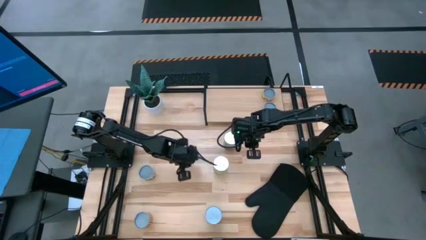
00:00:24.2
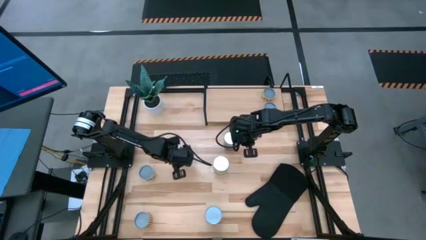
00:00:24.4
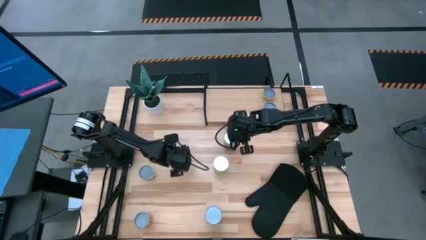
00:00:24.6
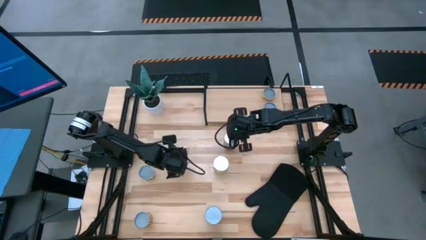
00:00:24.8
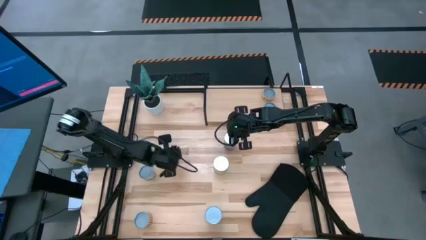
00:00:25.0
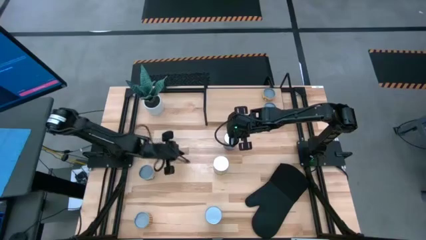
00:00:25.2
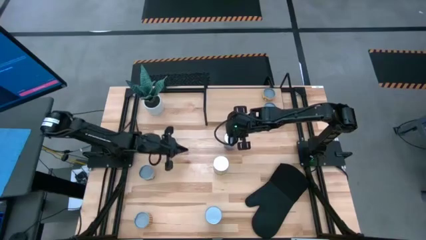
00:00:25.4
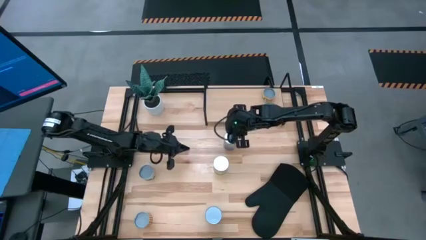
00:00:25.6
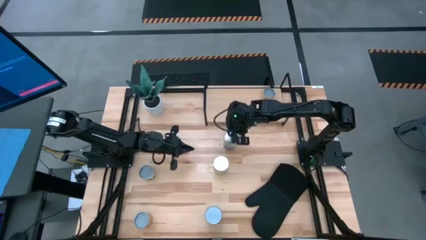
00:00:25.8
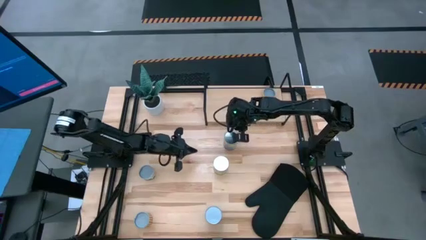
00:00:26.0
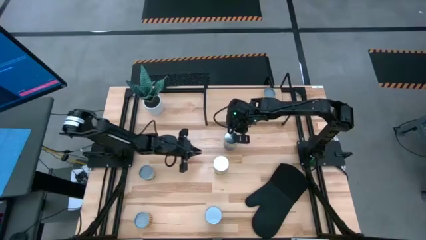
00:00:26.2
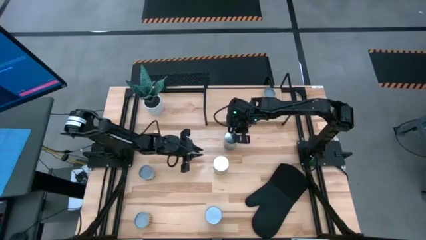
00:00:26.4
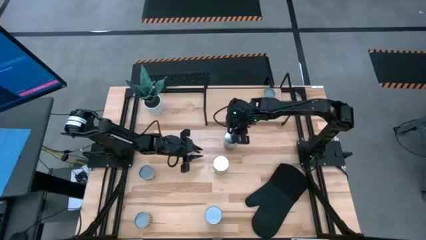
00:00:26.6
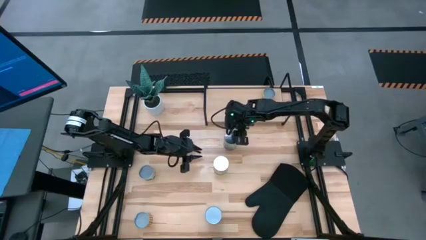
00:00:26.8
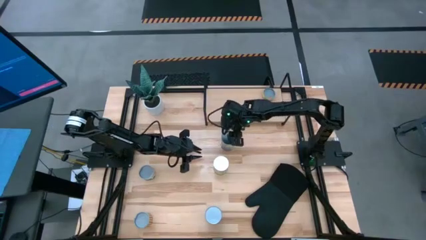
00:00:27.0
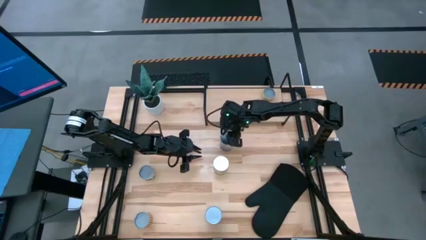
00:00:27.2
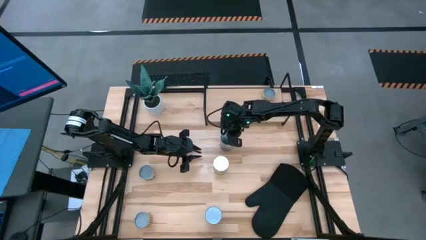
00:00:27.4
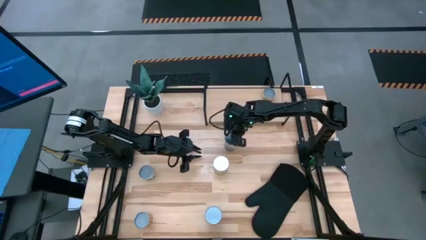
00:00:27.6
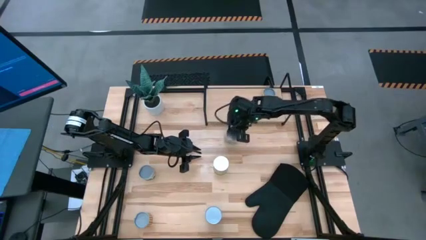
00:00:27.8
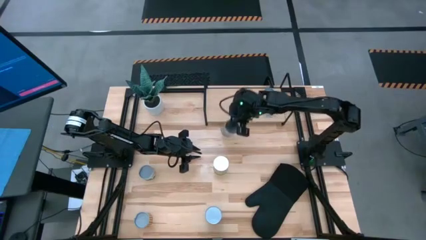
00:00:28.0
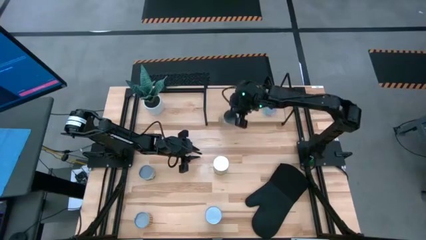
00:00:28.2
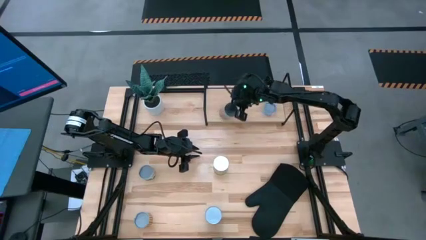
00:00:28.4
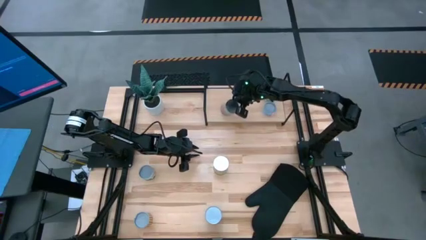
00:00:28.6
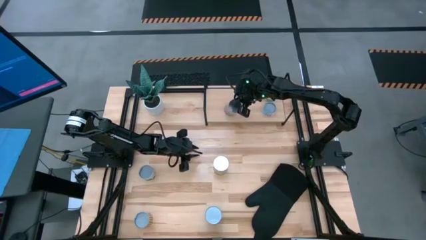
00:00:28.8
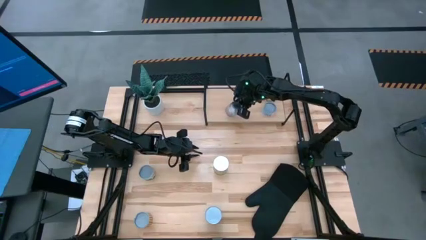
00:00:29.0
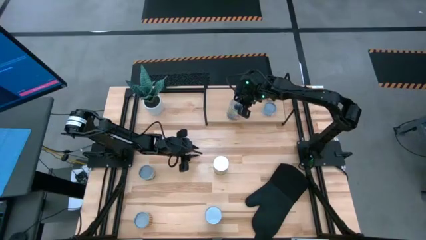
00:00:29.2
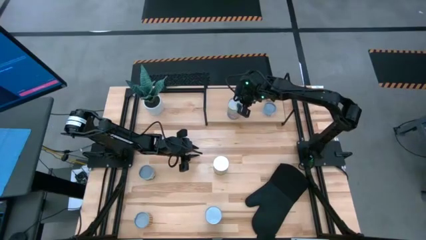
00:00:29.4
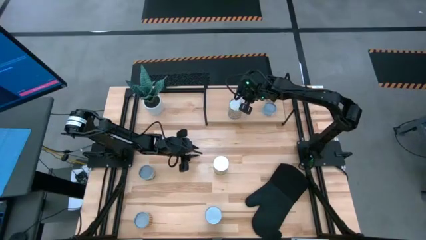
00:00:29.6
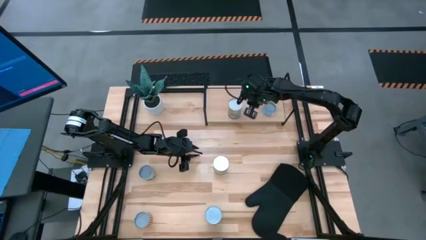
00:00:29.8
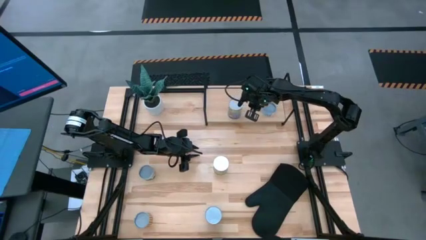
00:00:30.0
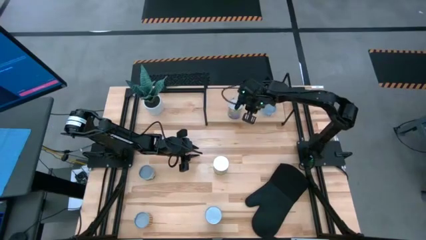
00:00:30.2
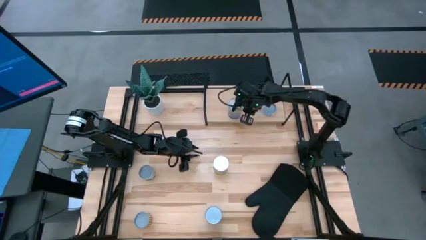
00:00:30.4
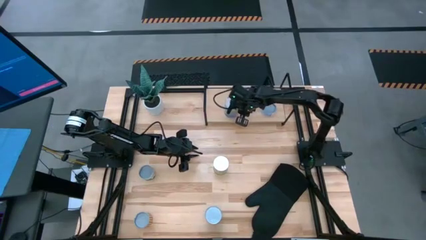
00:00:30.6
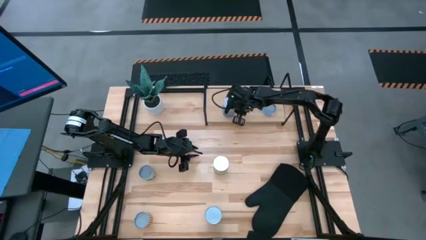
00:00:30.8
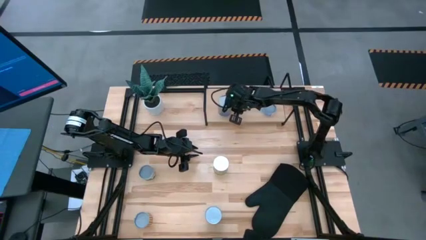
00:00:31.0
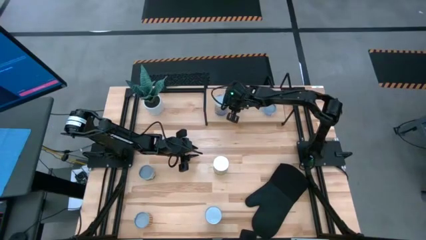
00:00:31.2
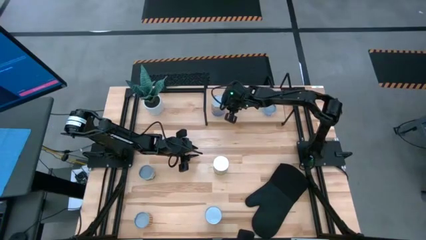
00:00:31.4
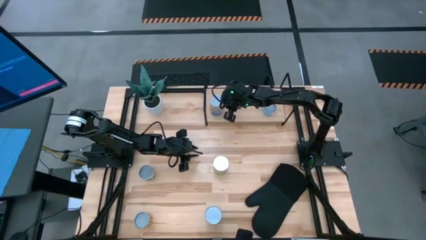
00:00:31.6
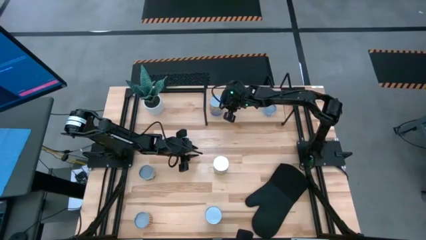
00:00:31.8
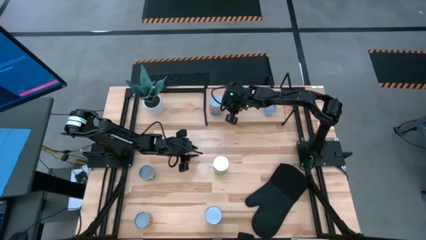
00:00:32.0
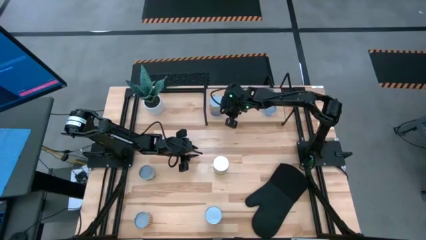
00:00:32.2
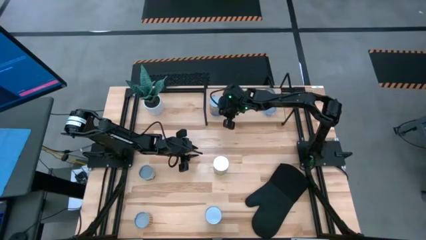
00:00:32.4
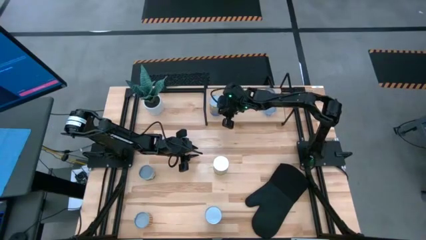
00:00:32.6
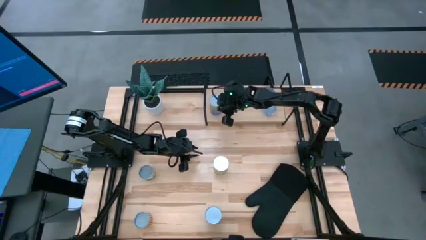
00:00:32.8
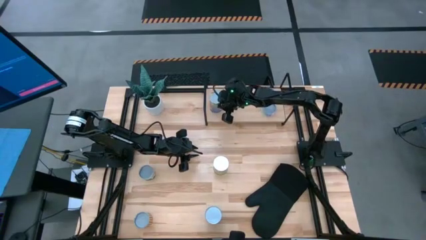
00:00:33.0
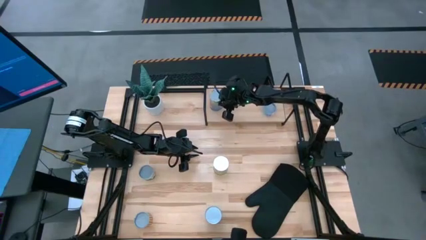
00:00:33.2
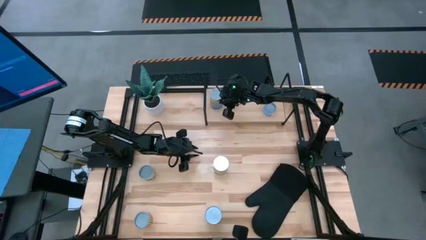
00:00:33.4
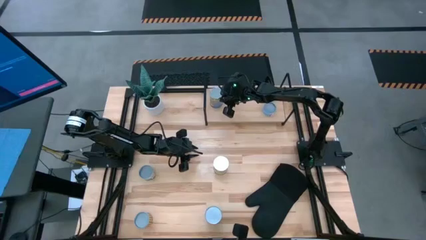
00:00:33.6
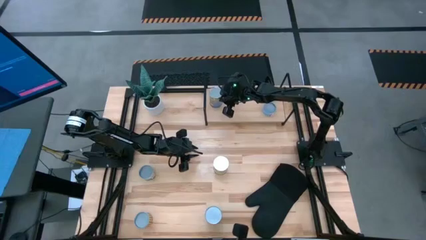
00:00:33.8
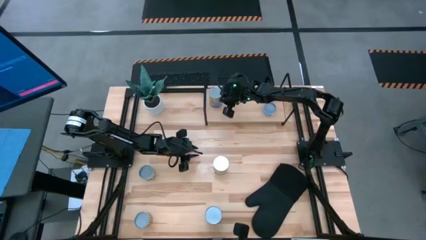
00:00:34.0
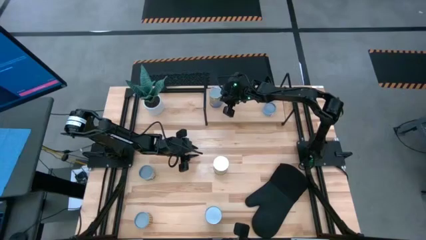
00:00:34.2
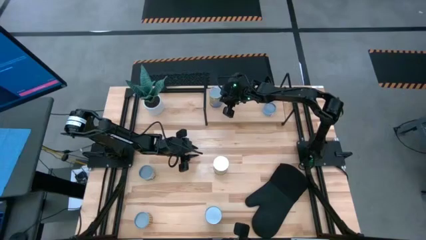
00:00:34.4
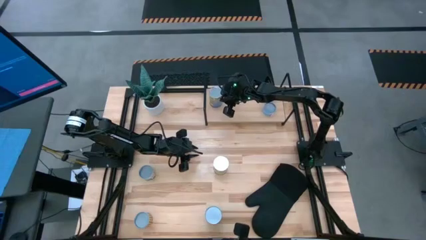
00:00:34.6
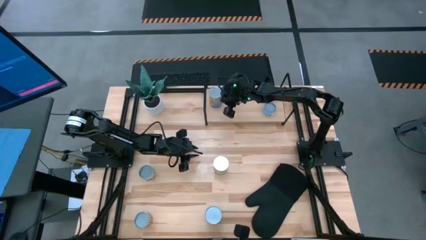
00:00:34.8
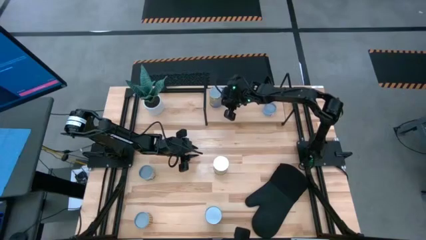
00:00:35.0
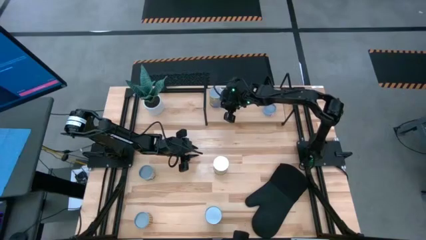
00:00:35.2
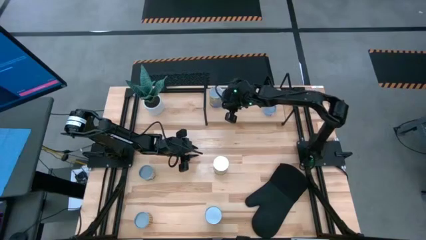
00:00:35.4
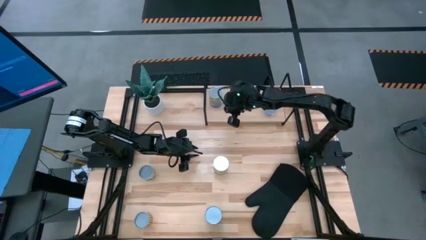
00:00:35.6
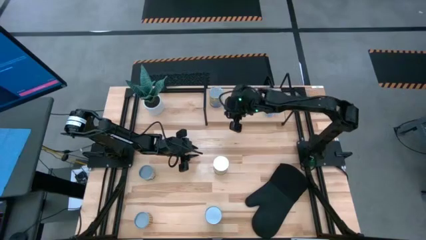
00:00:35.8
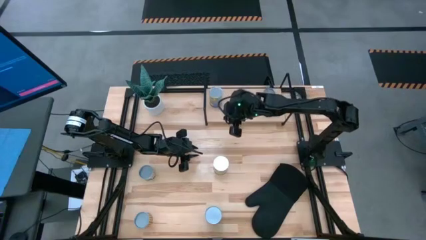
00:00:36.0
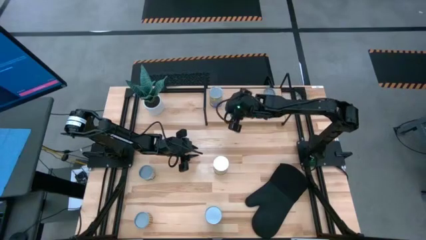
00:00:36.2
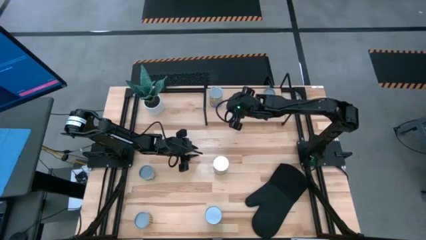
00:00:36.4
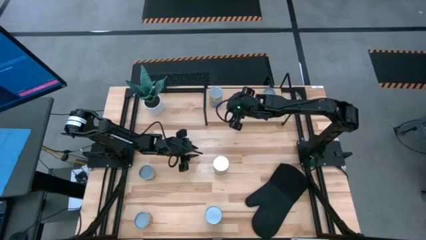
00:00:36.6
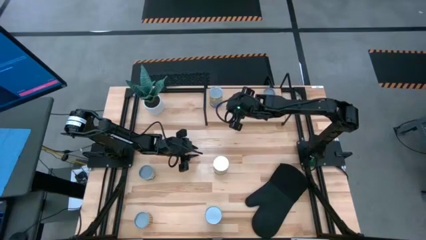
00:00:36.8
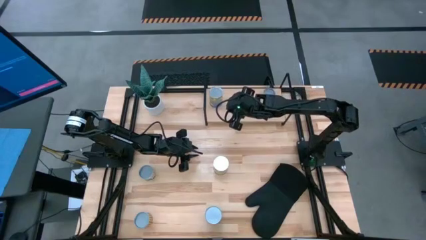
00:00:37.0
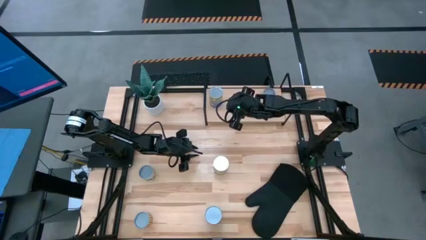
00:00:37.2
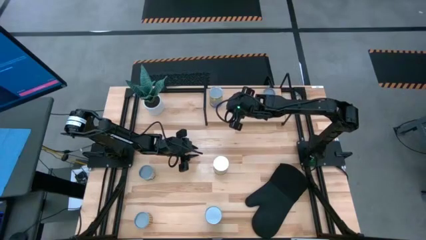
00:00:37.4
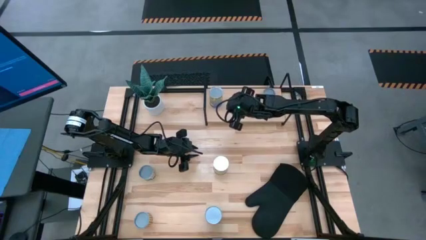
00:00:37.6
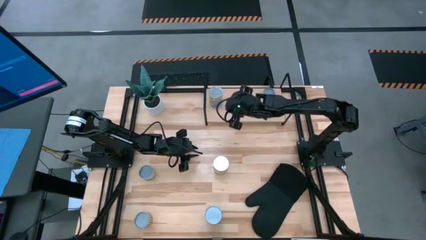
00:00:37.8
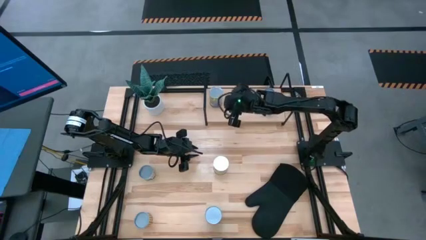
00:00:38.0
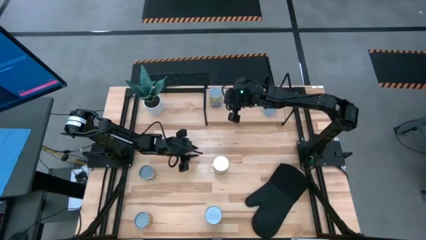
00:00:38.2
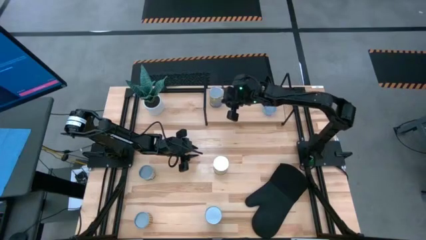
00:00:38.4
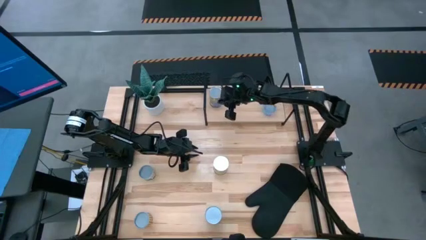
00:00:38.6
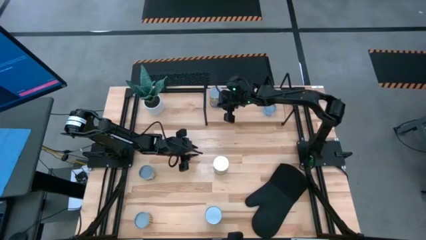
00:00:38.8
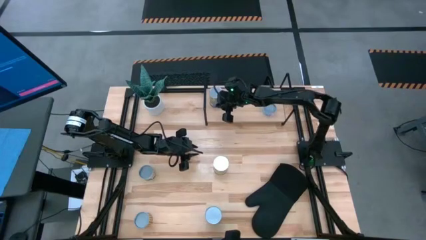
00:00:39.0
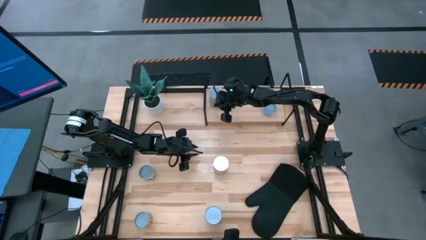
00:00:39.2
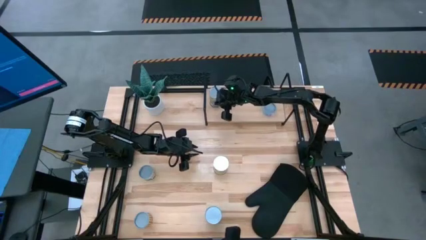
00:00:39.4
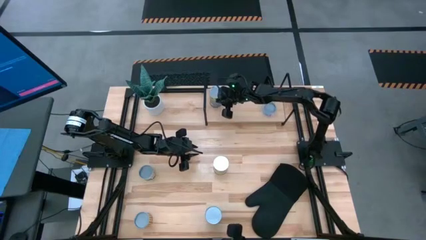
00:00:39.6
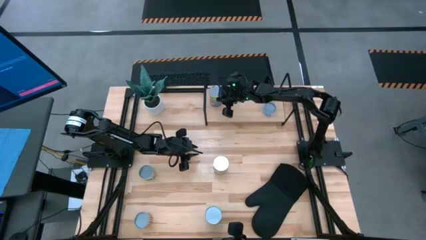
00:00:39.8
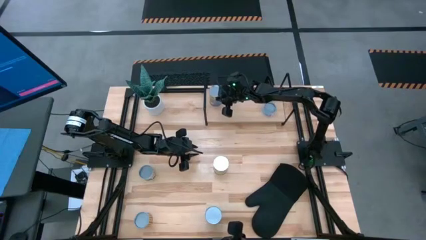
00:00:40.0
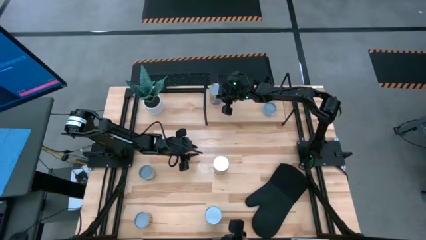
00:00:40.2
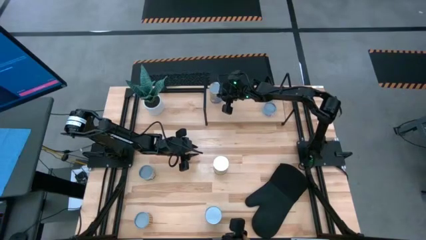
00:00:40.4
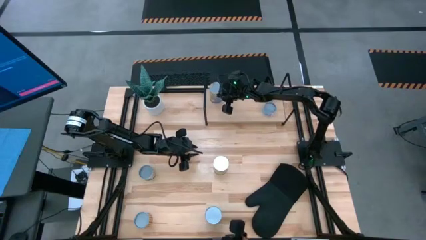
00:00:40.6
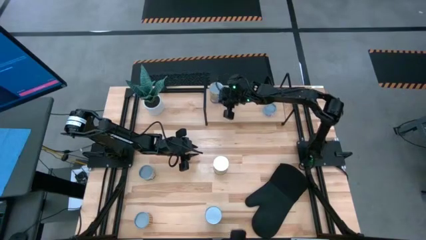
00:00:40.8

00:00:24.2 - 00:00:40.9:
Task: Pick and place cans onto a shelf
Put the canned peaches on the shelf
